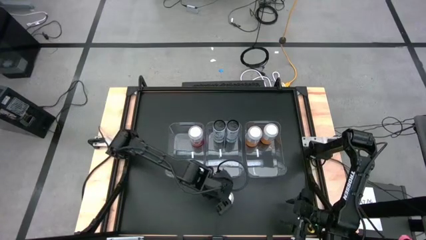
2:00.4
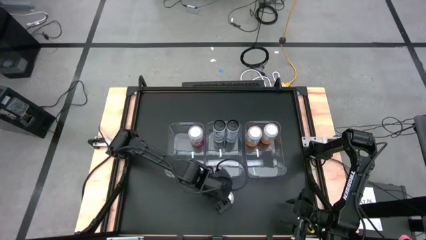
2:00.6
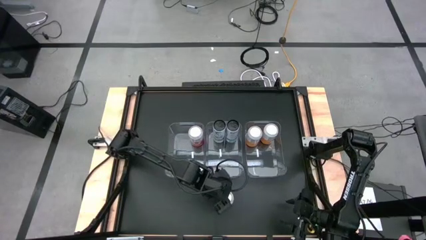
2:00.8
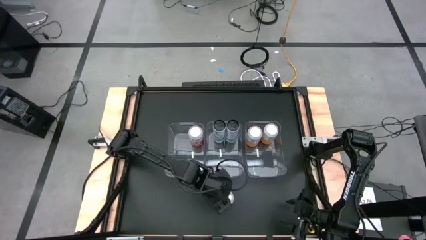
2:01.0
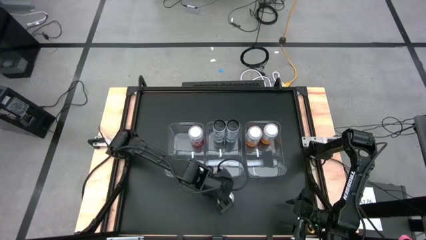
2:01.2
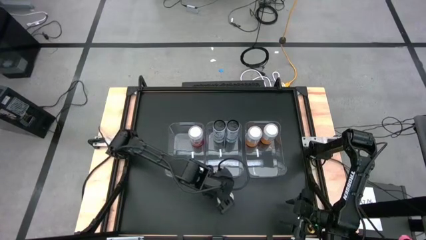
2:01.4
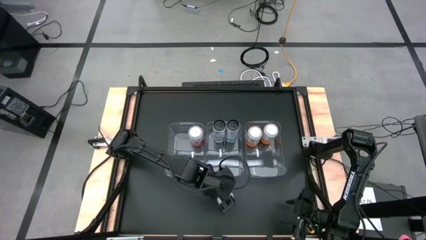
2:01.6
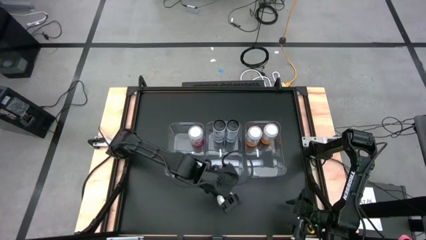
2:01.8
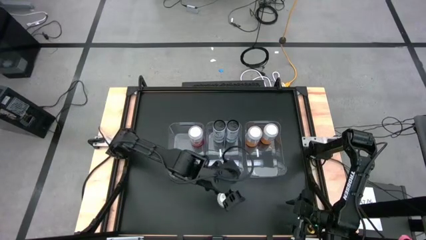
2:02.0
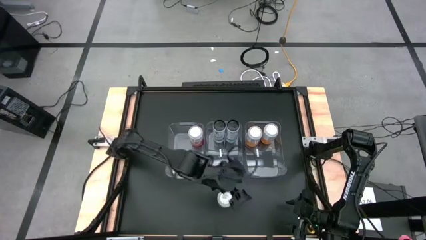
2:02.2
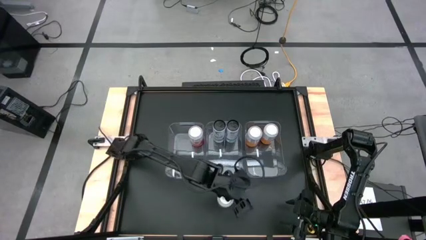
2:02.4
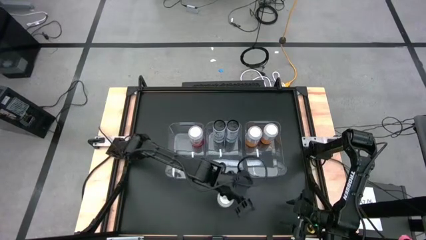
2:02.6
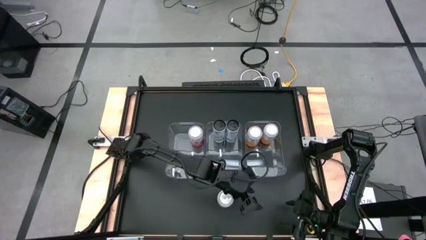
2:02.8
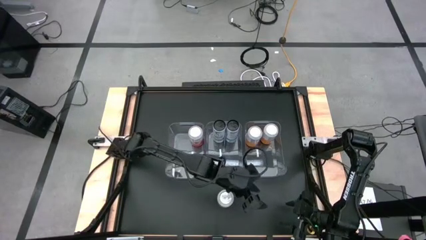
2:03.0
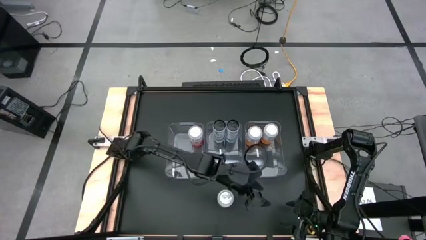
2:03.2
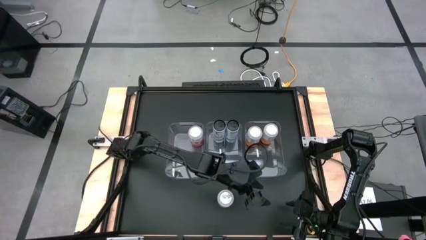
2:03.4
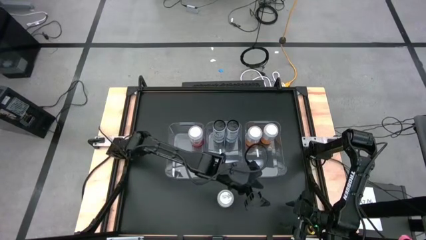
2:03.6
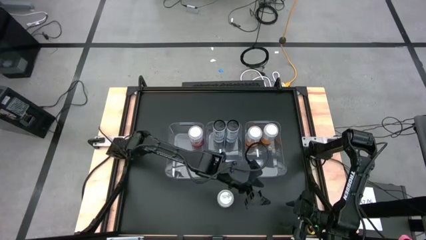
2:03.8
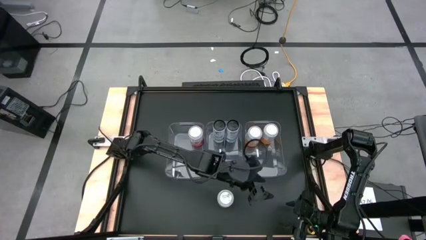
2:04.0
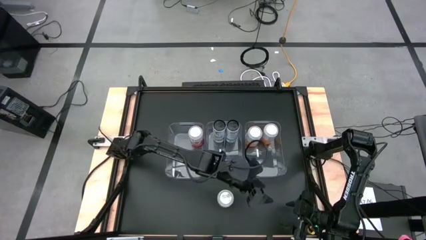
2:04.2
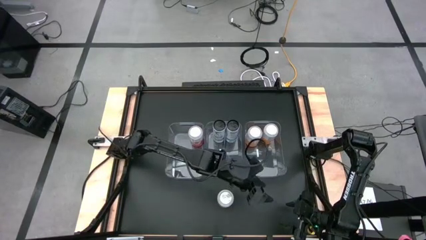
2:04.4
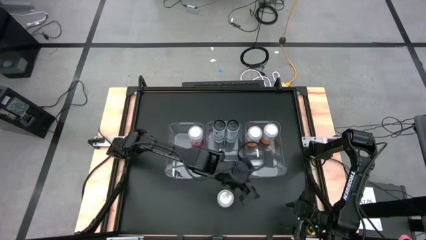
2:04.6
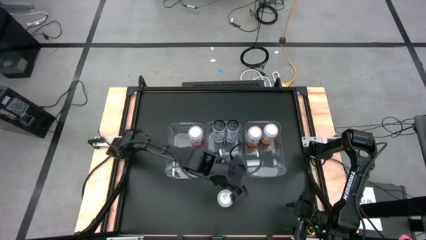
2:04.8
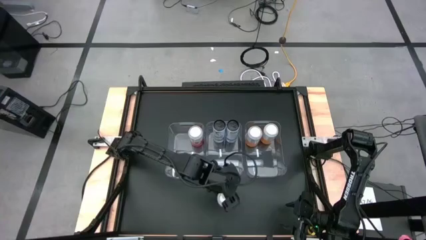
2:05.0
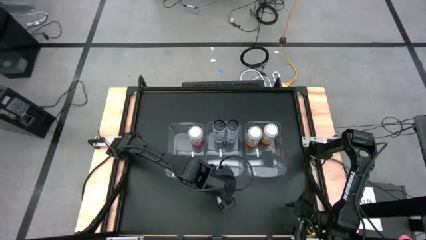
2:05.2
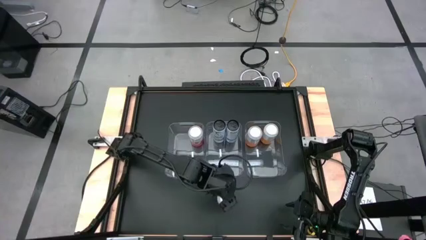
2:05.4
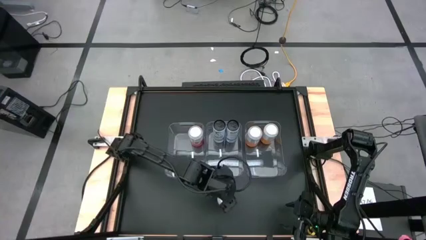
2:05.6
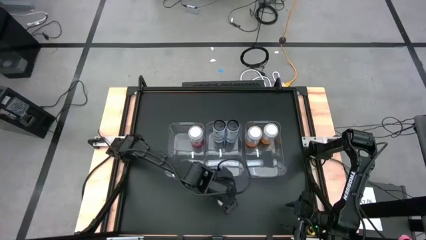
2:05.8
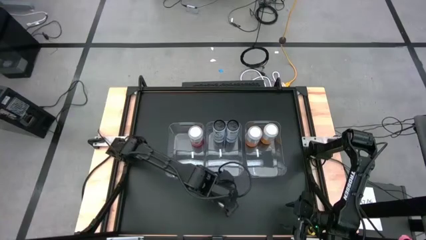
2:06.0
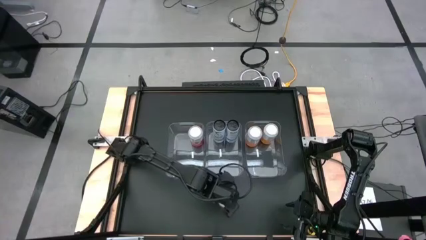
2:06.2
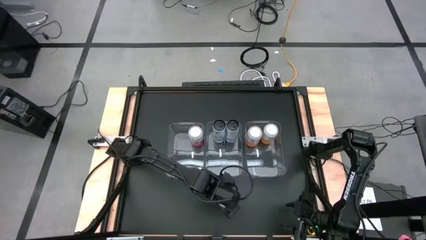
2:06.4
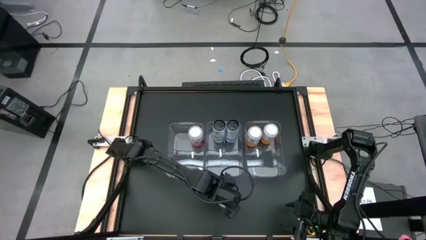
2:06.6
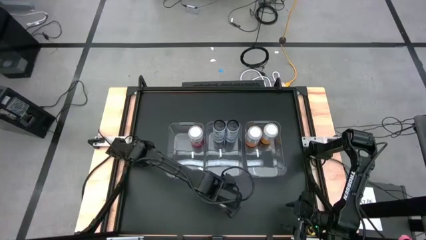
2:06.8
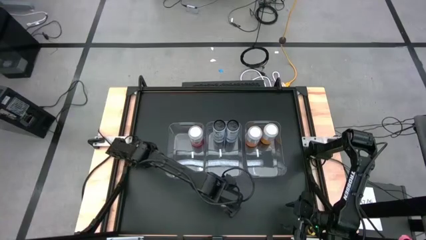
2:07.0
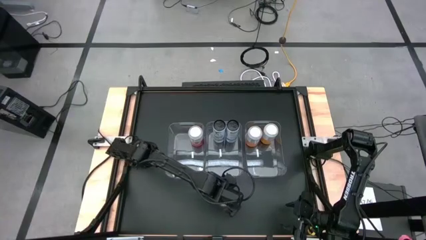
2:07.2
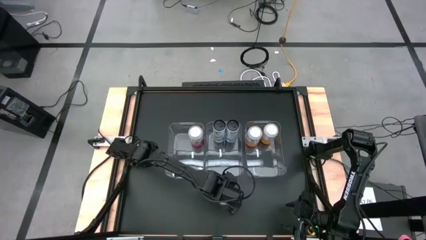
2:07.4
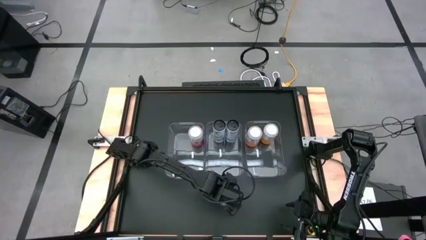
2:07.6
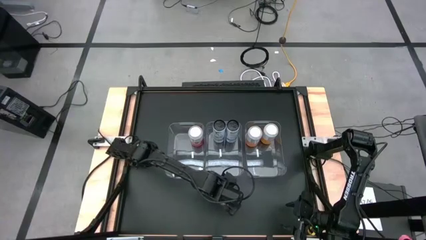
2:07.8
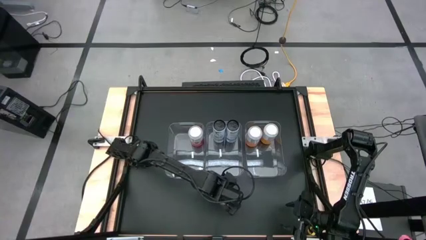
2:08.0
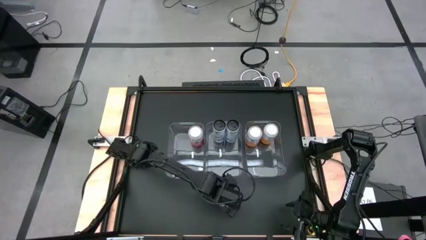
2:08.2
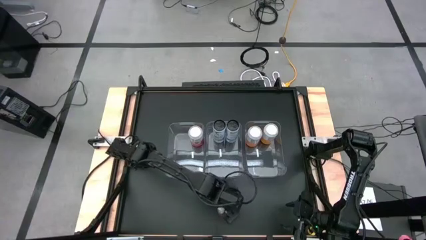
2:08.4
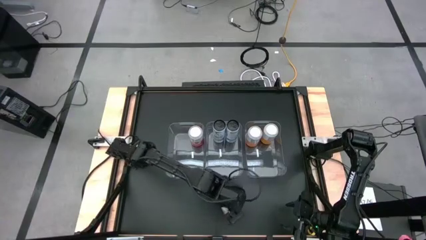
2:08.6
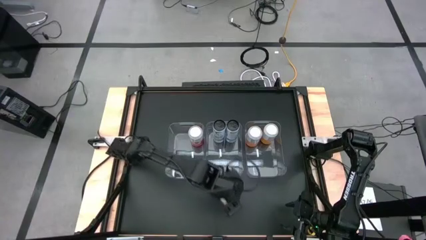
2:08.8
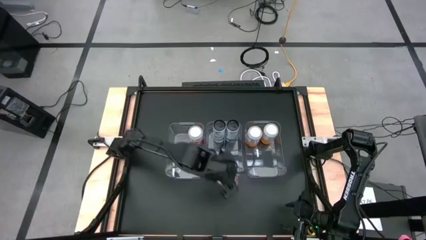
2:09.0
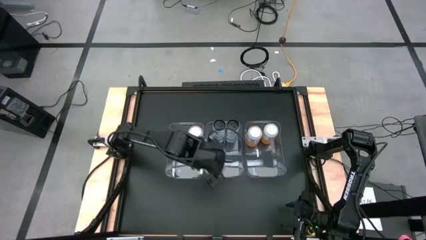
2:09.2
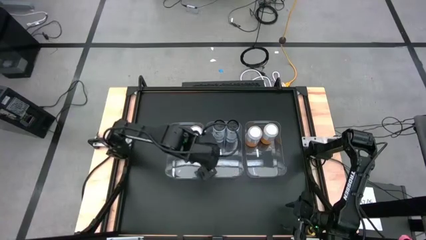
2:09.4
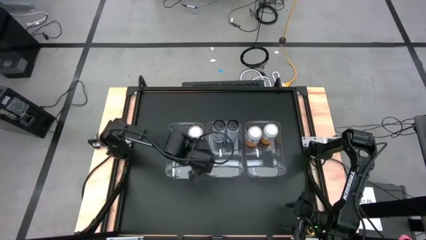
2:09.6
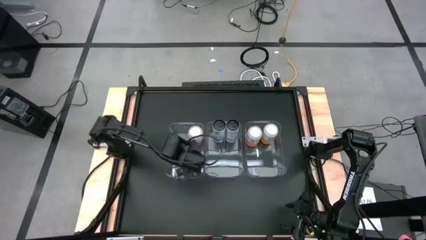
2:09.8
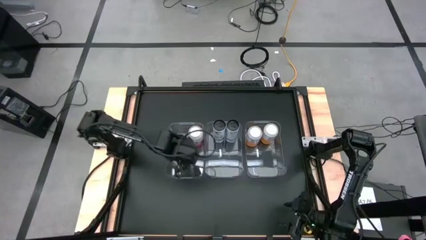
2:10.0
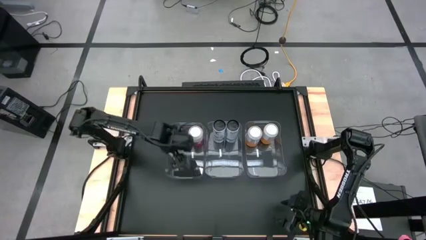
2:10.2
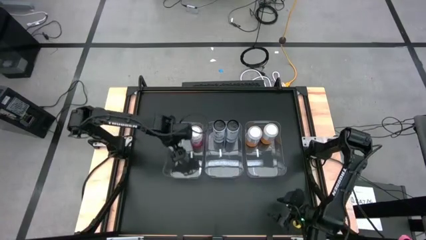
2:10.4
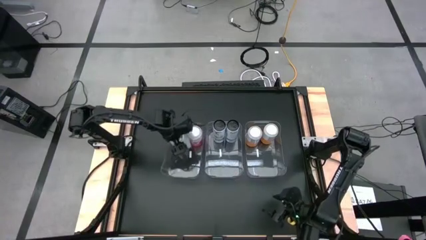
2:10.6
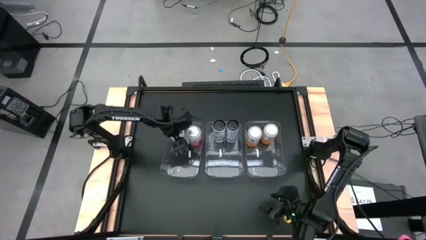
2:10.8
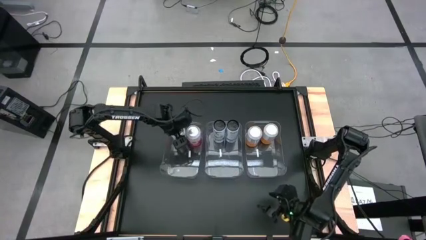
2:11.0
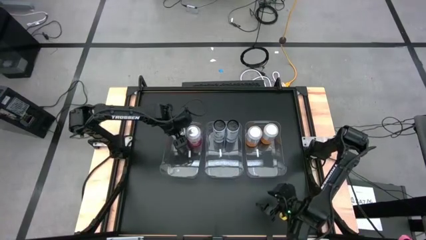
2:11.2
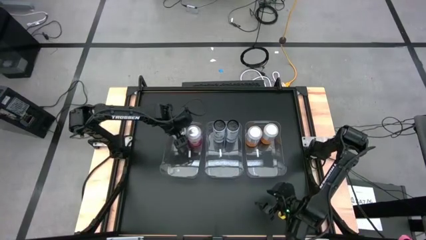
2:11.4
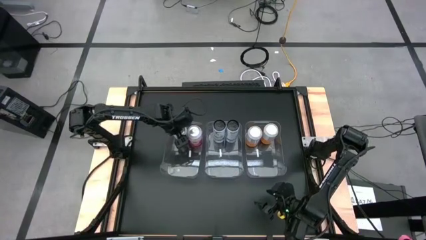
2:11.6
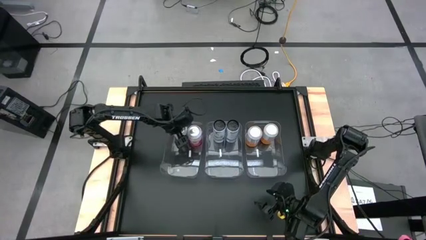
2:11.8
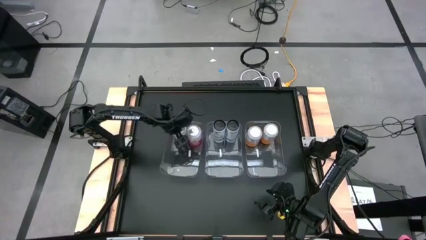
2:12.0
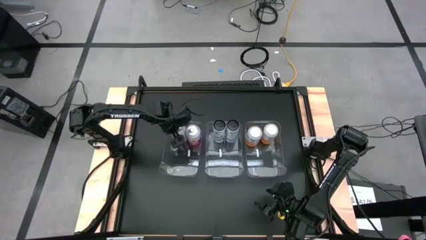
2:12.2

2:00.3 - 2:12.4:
Task: Sort soda cans
Put the pink-white soda can into the left transparent bin

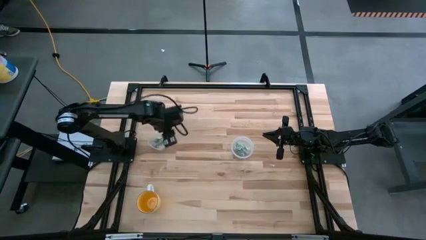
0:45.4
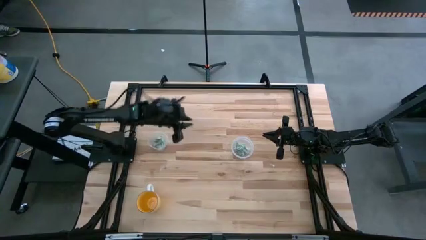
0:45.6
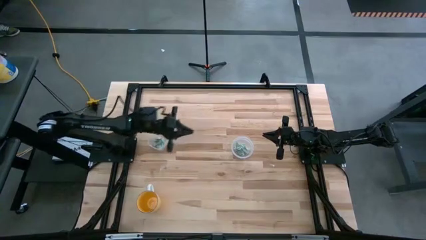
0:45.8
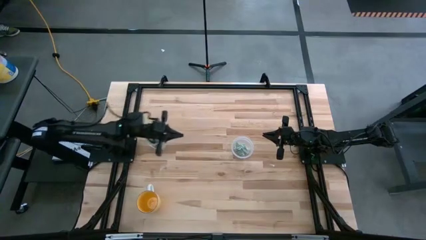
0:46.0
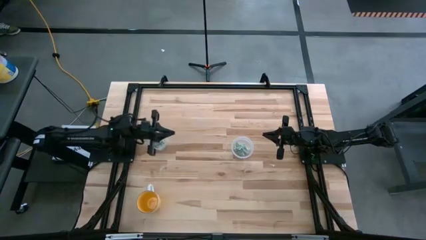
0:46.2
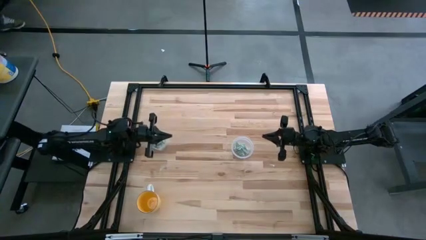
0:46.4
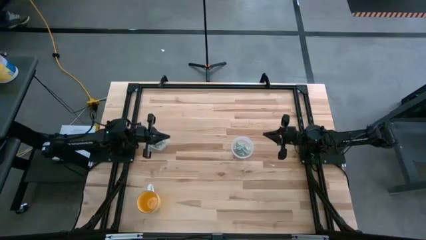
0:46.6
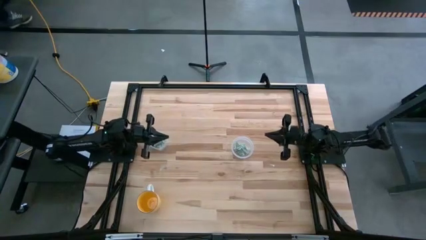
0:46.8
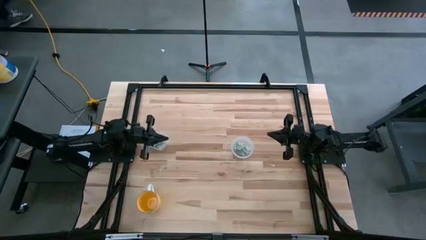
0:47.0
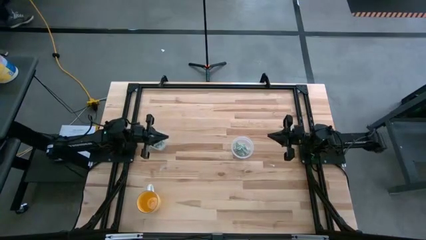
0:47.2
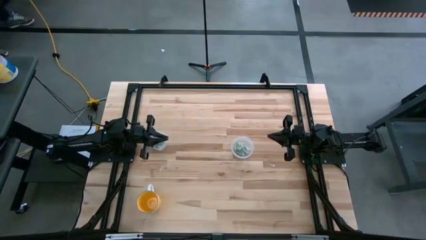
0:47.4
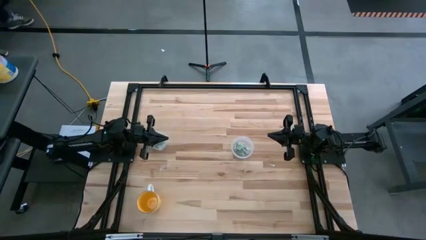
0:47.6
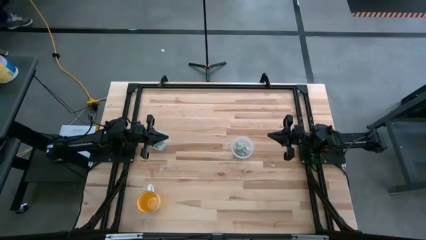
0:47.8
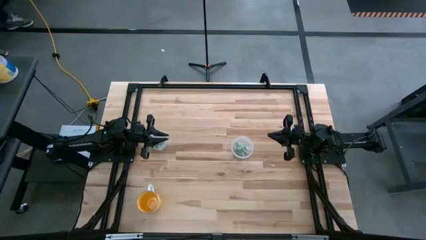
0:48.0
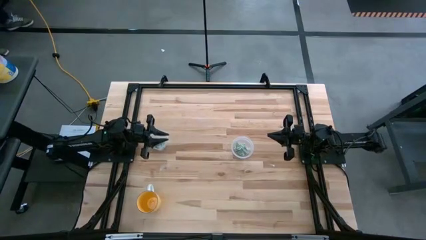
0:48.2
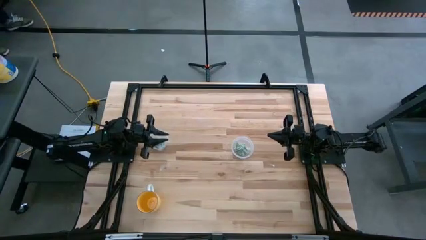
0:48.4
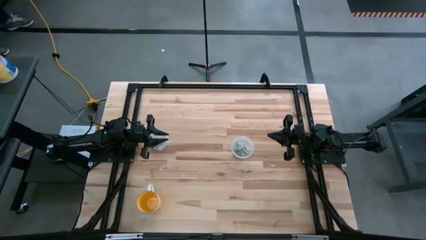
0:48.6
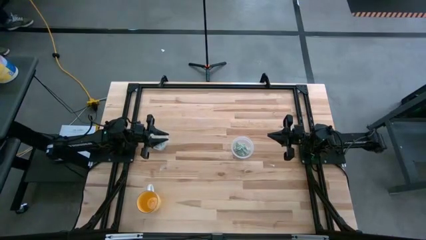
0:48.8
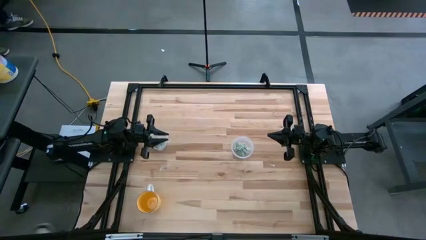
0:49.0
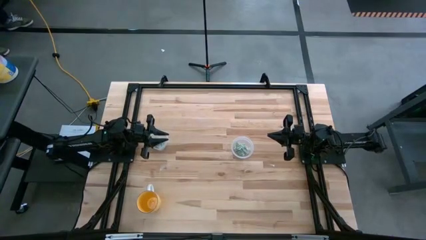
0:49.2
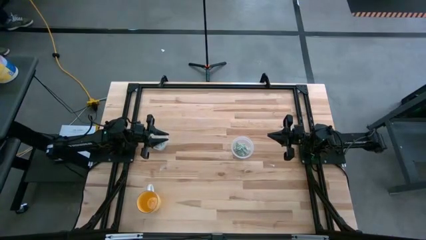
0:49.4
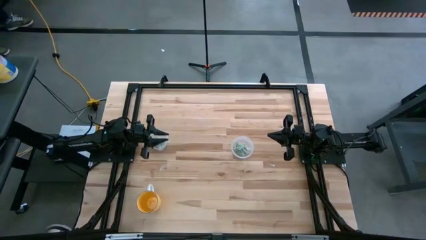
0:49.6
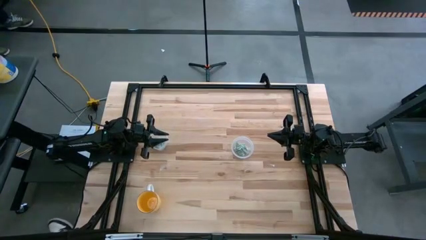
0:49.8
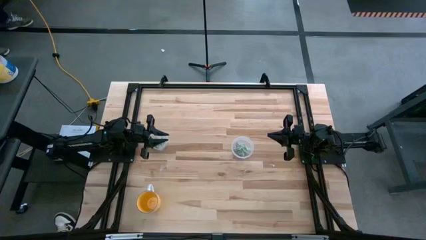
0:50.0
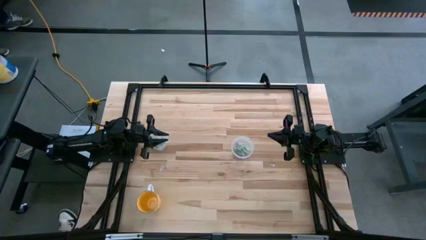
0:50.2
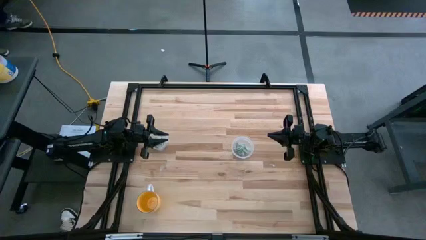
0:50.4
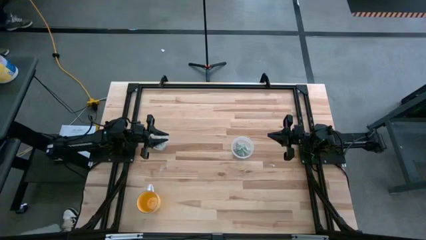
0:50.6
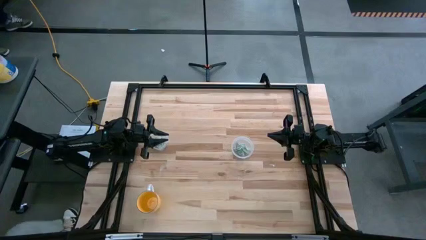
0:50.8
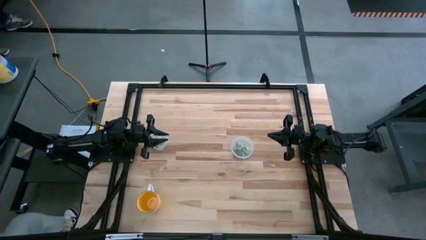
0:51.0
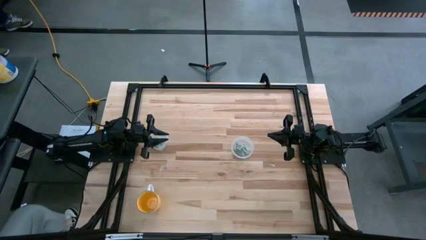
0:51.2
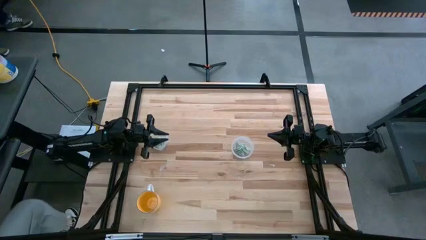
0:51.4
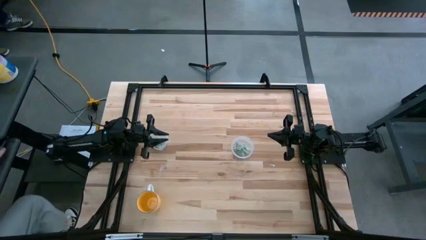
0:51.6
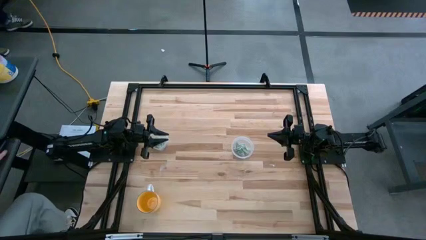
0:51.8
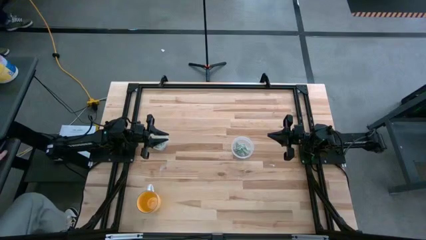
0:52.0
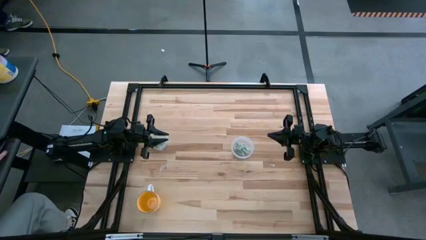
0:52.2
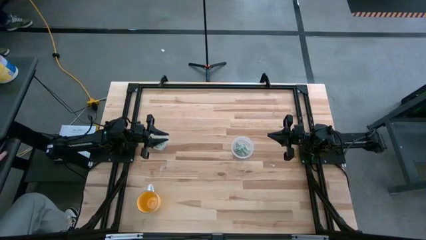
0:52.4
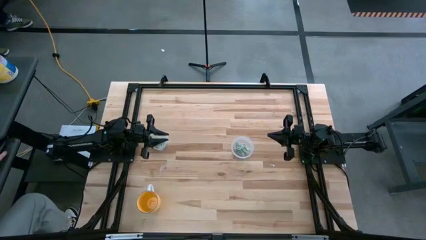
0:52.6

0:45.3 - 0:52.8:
Task: Pick and place items into bin
Return to Home Position
